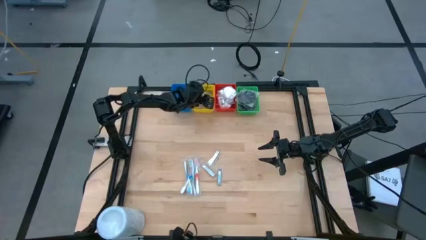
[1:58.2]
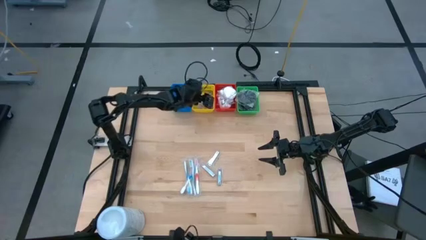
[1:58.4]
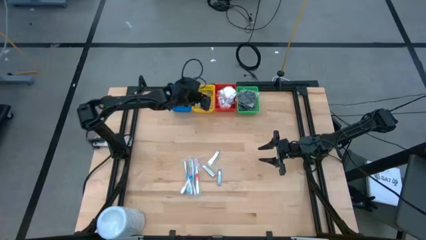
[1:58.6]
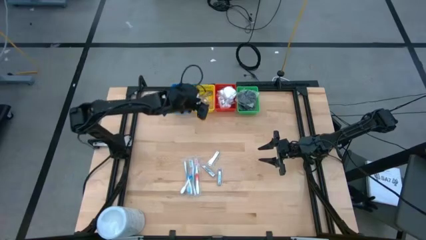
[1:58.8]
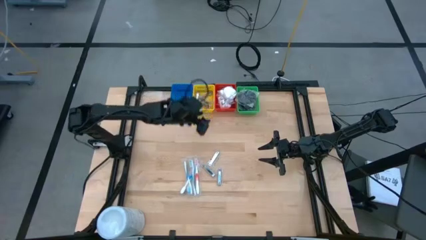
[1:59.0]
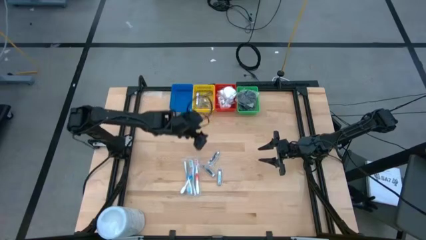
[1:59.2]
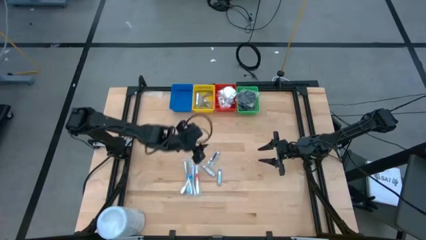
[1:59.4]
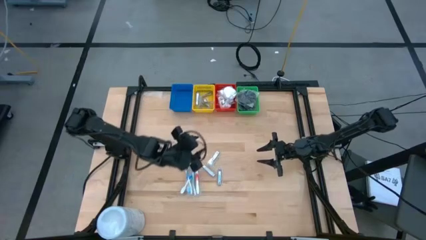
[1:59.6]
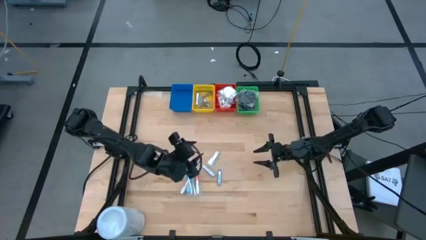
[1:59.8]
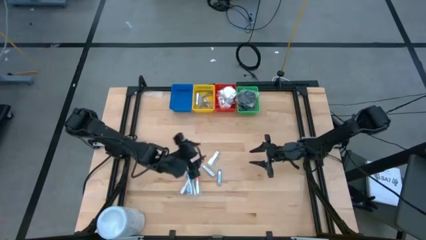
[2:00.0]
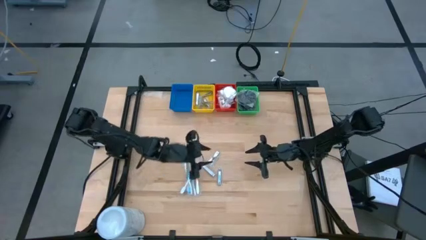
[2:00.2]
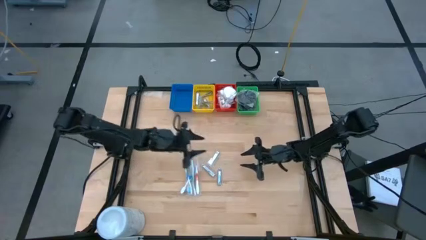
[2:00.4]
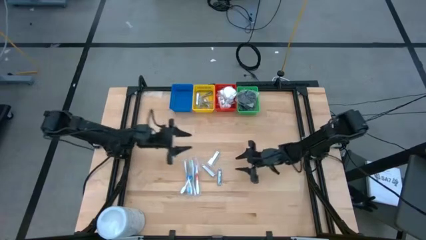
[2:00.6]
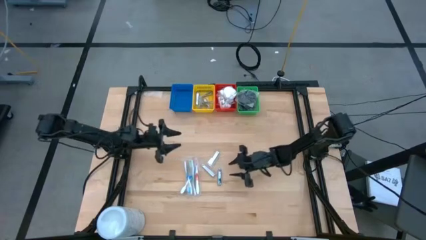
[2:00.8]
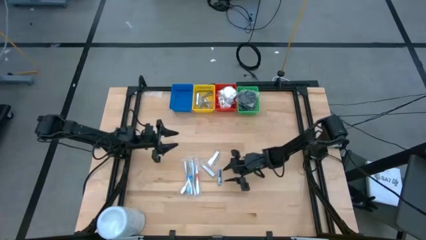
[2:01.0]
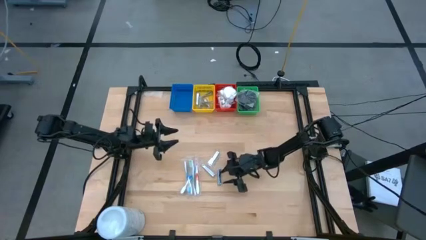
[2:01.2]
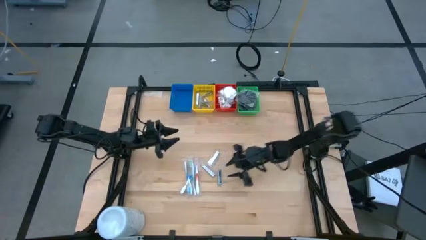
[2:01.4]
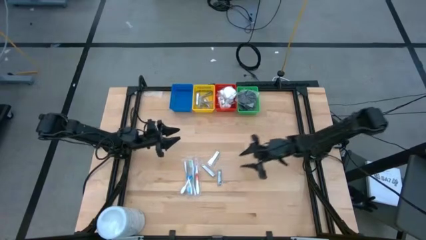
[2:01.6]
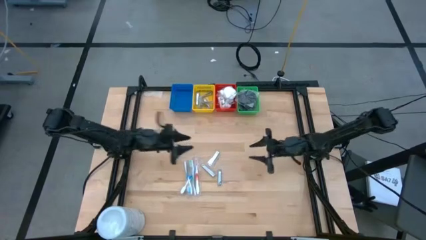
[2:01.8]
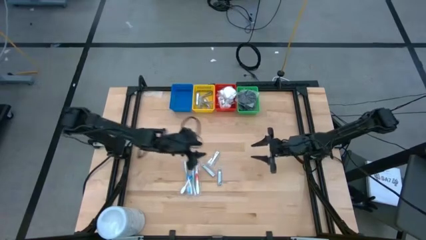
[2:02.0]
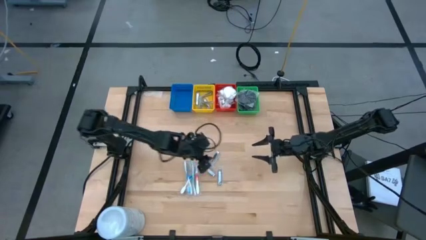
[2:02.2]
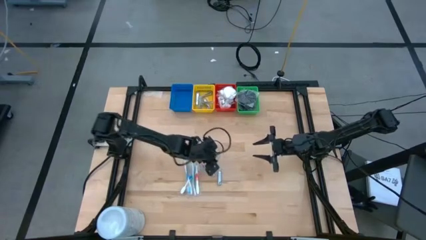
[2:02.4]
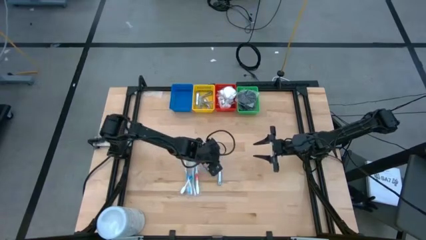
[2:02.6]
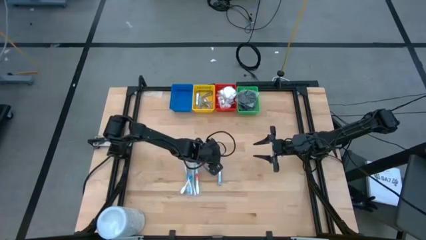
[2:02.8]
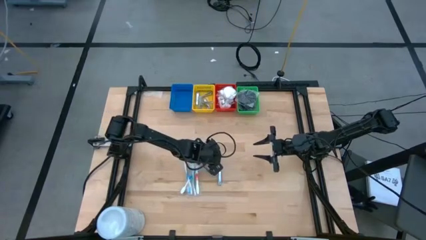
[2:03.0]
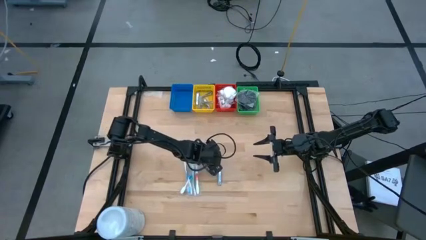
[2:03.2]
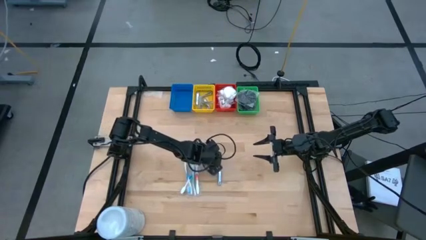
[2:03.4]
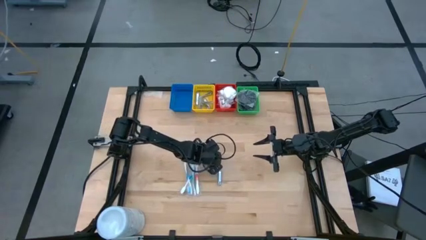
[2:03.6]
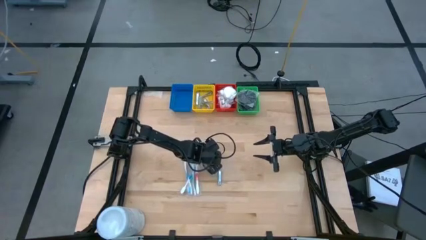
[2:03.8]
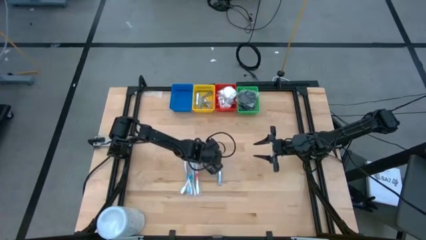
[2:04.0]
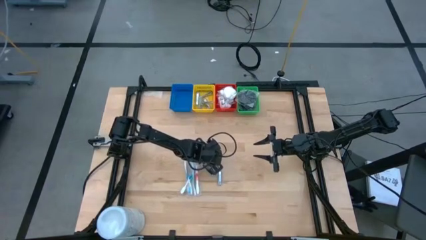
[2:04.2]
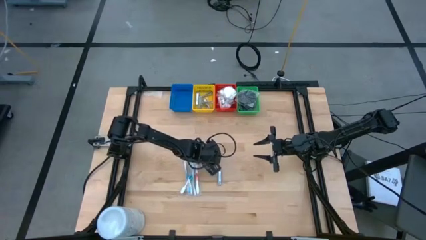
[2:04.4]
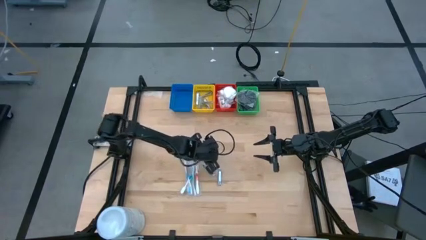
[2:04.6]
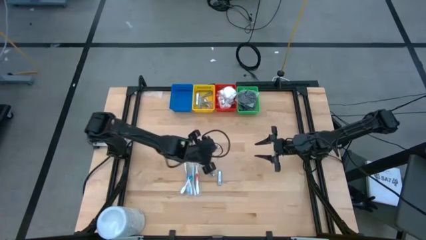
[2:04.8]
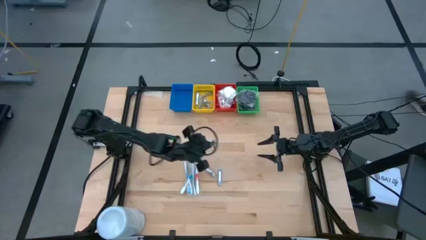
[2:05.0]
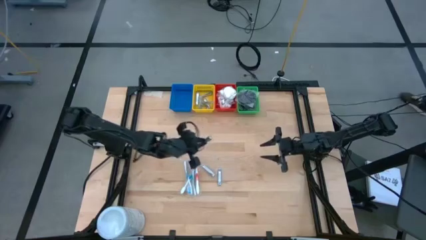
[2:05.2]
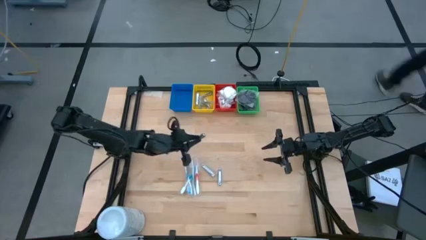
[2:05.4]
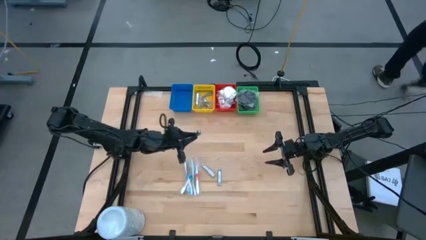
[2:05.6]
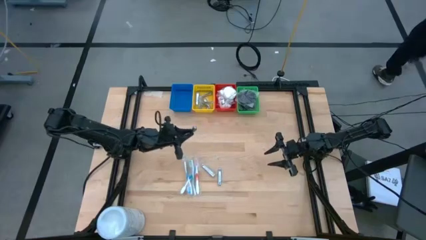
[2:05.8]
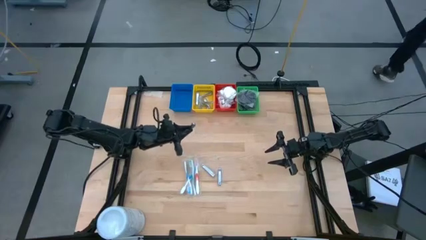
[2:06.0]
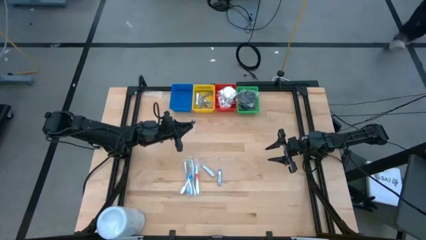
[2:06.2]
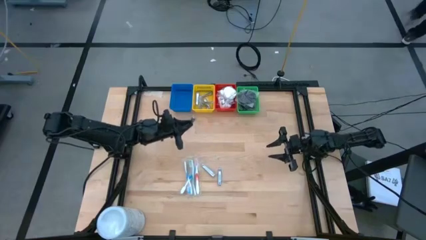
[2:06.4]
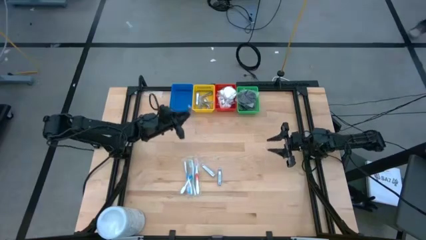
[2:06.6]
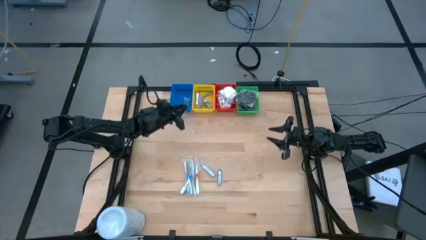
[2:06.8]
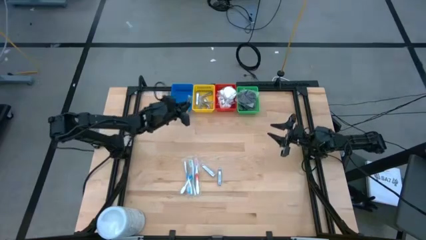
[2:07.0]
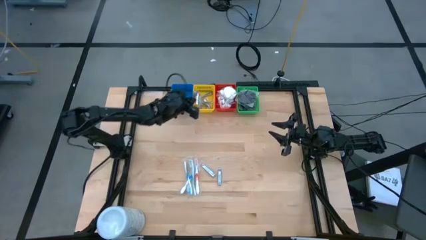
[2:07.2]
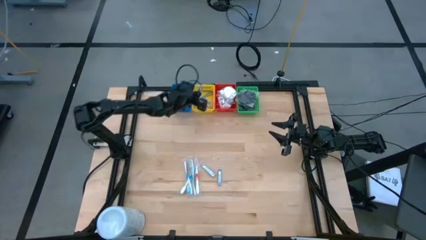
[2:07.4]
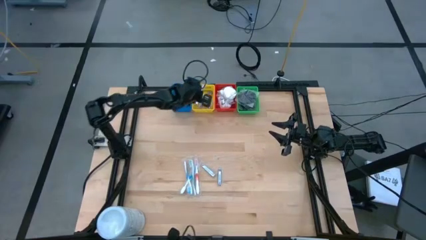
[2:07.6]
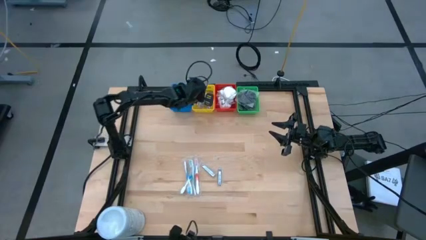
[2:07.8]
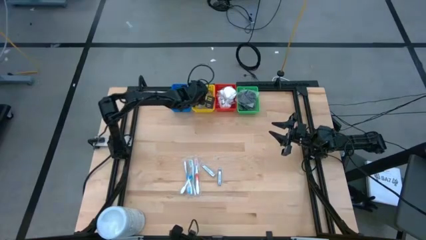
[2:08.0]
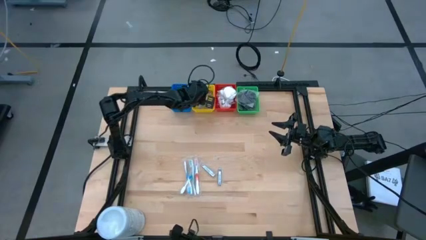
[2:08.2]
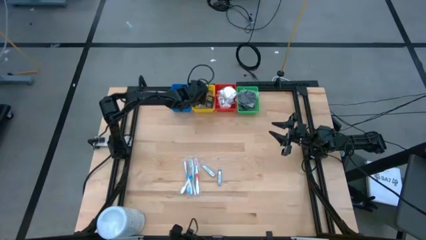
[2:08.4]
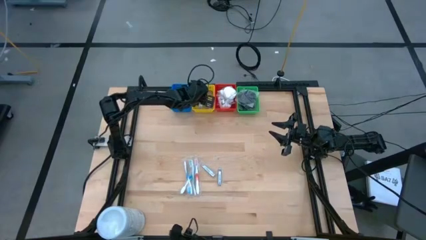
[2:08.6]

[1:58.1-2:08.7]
Task: Pick & Place Travel size toiletries
Put the nail cutter into the yellow bin

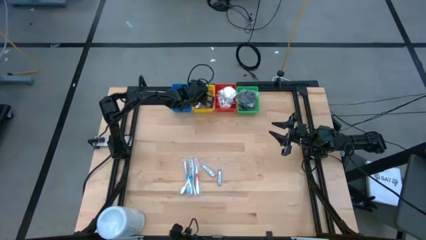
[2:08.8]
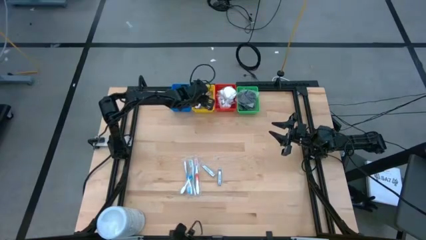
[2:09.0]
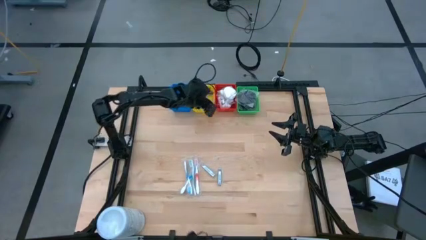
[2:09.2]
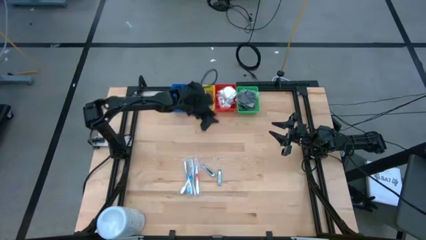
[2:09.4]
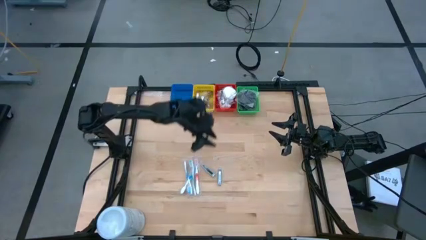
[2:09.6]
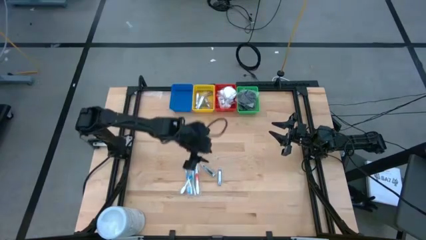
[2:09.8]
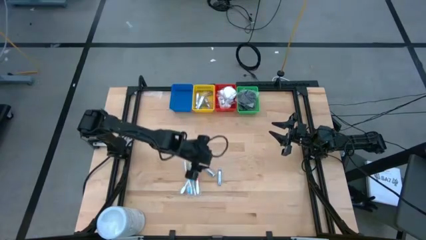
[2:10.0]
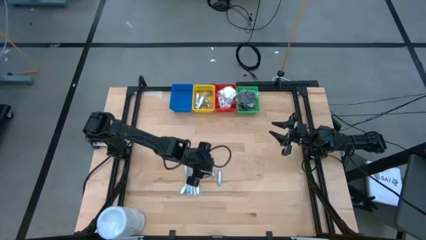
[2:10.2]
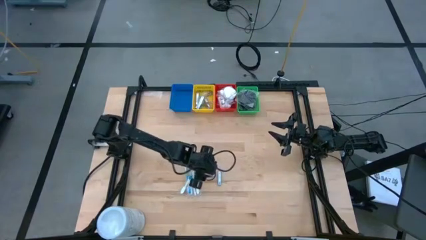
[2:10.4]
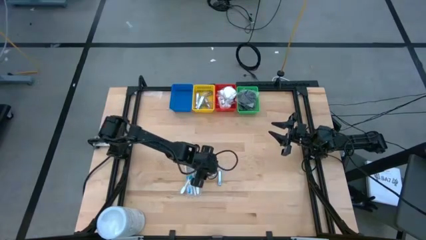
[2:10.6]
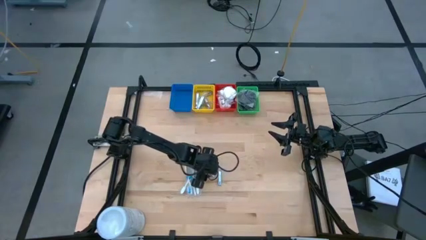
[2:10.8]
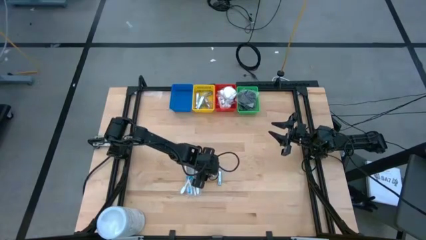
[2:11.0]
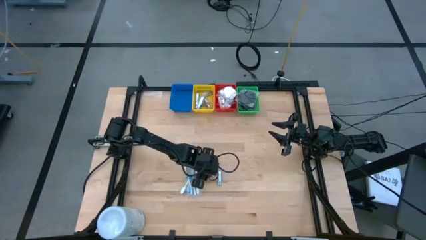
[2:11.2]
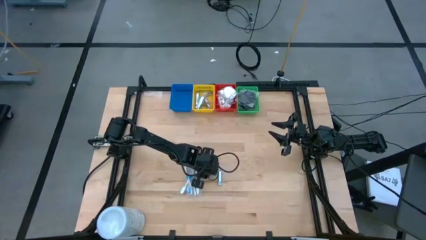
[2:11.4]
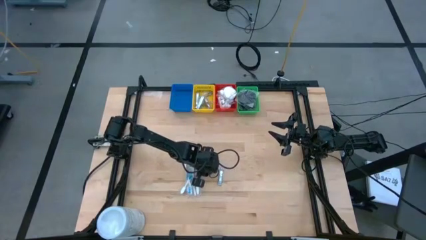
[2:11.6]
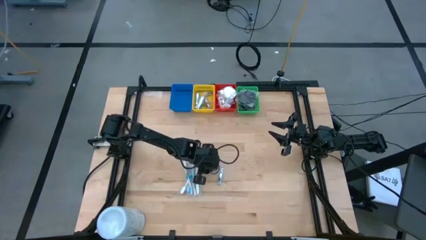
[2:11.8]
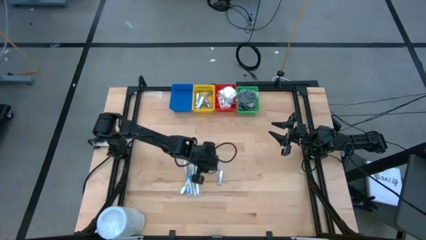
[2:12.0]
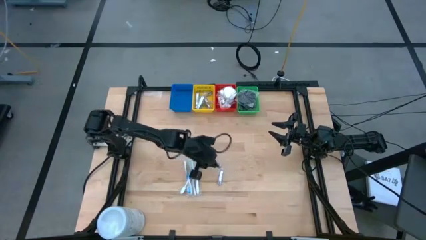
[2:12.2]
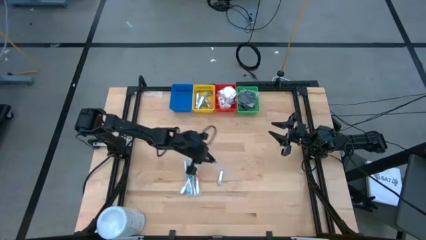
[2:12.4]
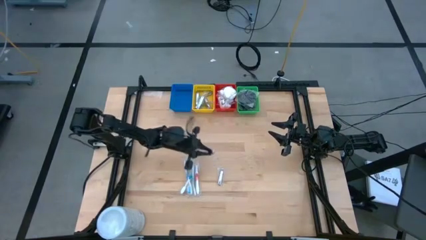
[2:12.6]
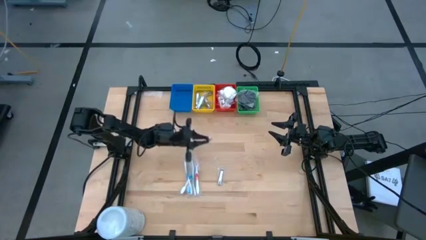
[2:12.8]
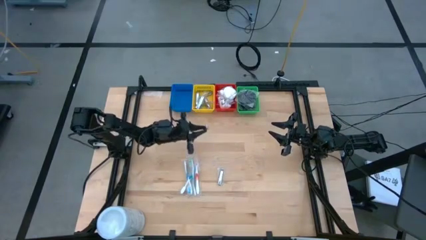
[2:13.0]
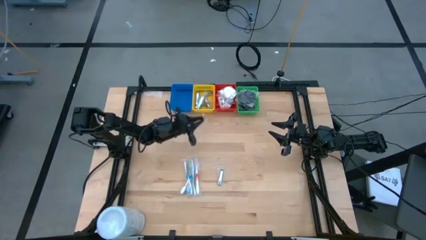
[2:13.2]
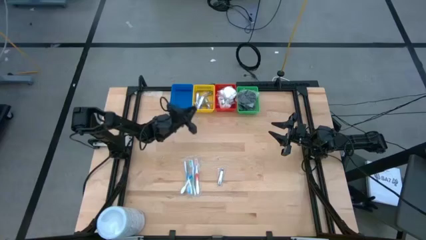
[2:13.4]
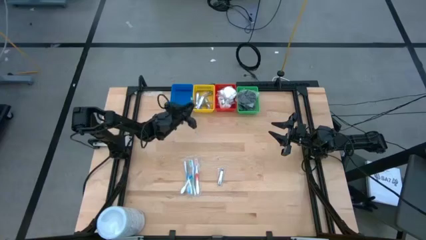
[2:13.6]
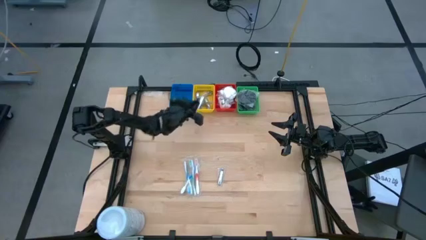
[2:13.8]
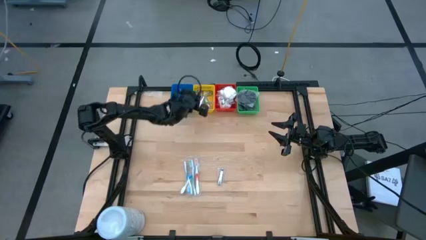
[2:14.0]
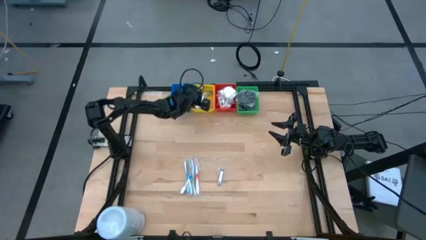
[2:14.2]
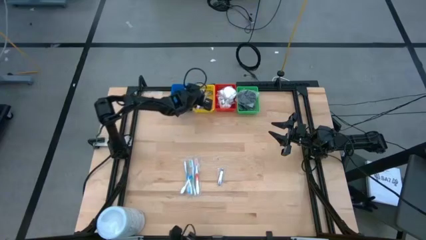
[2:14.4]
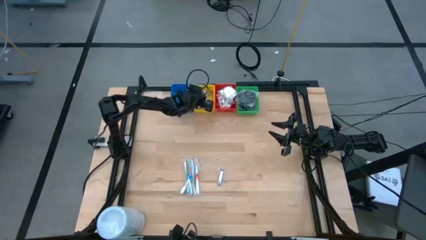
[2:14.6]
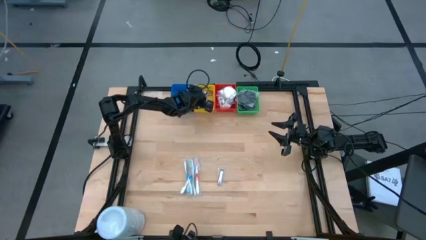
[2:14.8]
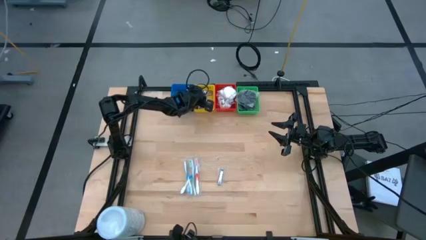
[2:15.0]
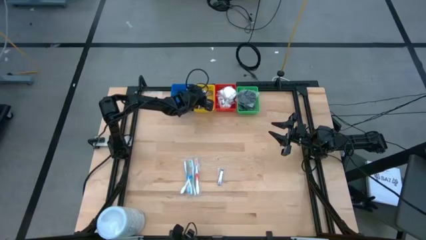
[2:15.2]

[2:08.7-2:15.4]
Put the nail cutter into the yellow bin

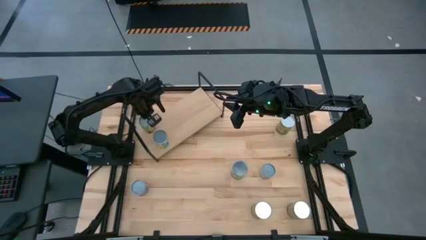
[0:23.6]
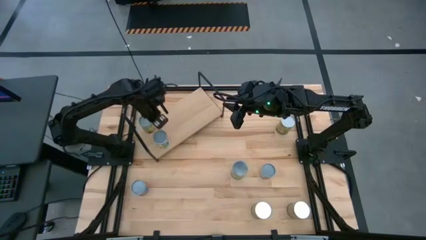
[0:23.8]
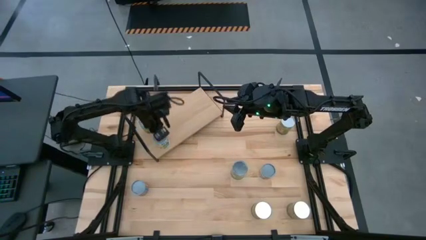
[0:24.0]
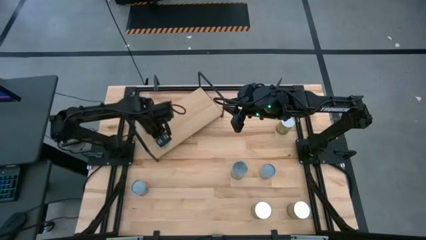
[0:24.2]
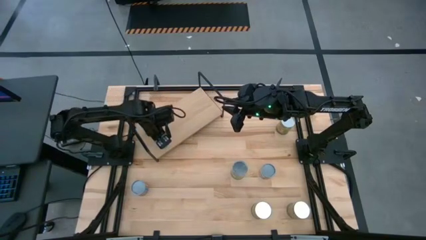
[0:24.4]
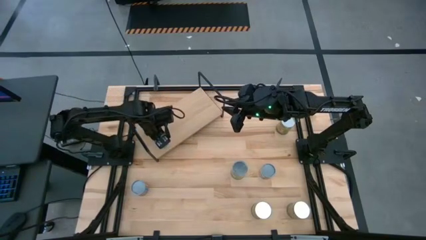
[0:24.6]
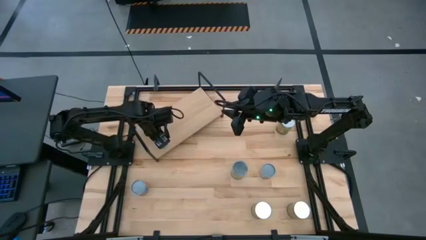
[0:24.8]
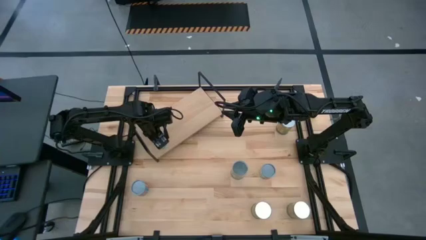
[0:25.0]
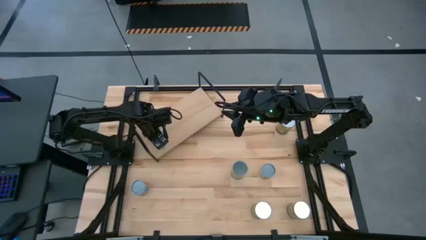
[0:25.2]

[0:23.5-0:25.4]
Task: Pick and place cans onto a shelf
Adjust the canned mixed fruits
